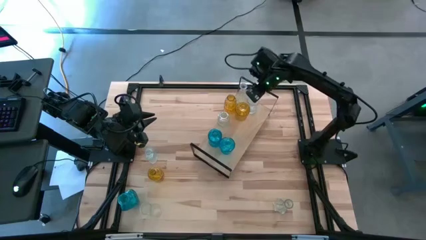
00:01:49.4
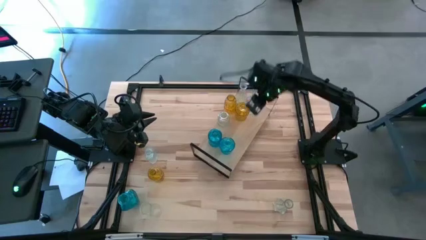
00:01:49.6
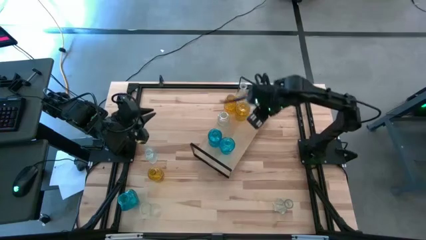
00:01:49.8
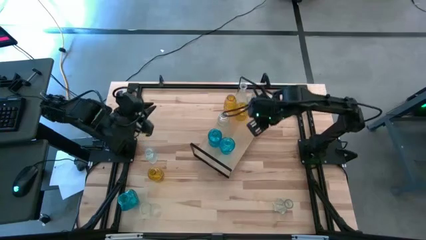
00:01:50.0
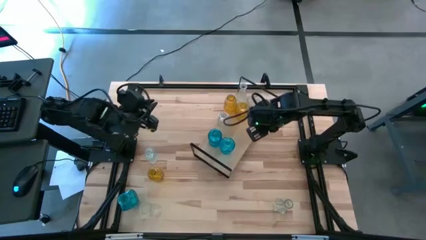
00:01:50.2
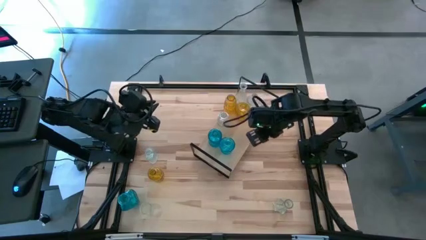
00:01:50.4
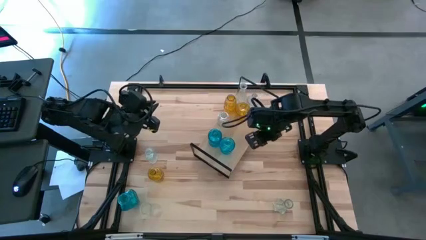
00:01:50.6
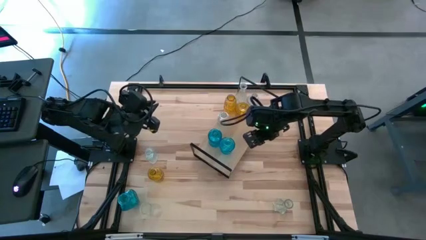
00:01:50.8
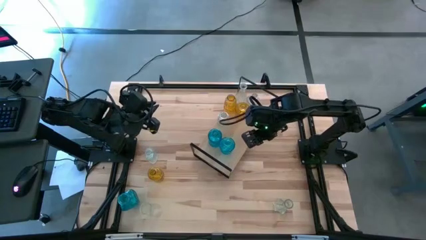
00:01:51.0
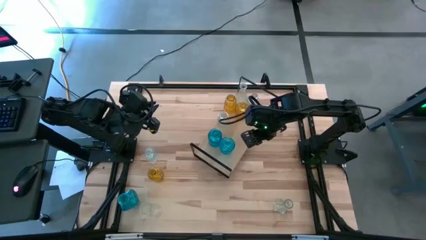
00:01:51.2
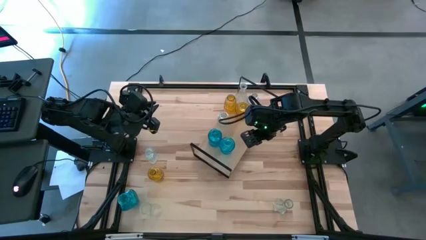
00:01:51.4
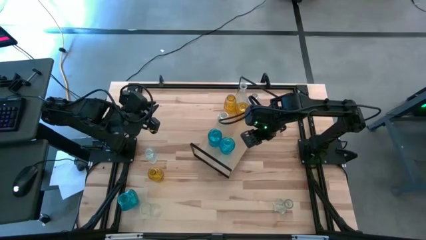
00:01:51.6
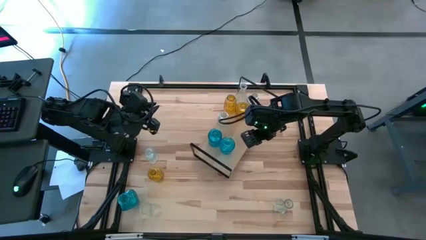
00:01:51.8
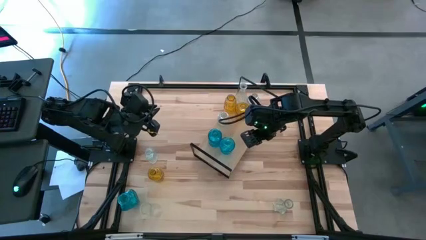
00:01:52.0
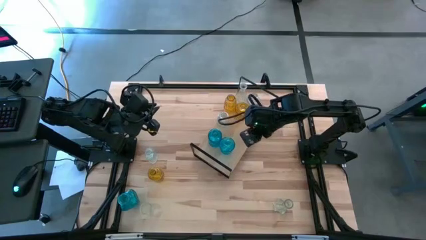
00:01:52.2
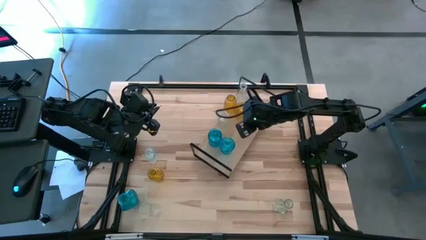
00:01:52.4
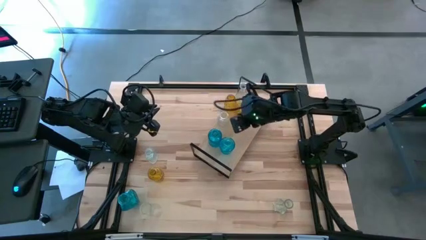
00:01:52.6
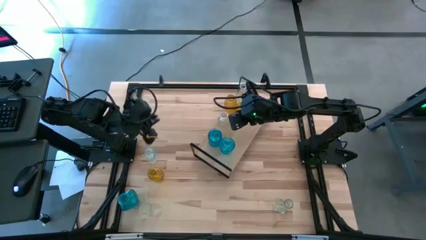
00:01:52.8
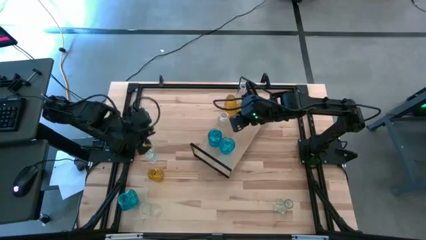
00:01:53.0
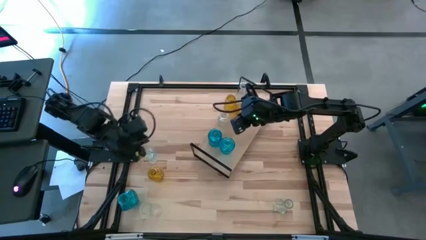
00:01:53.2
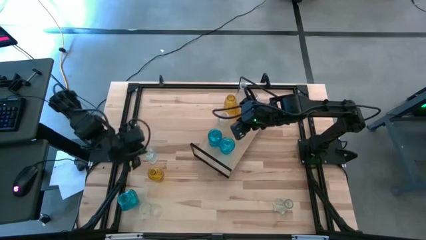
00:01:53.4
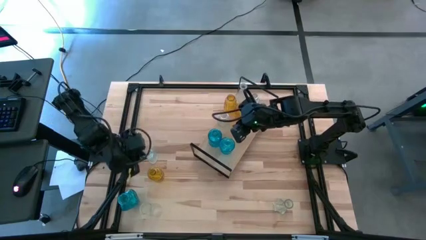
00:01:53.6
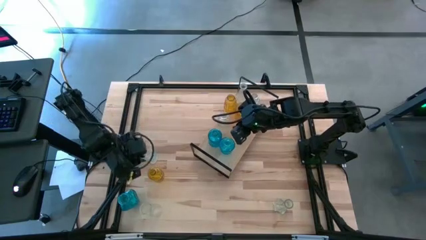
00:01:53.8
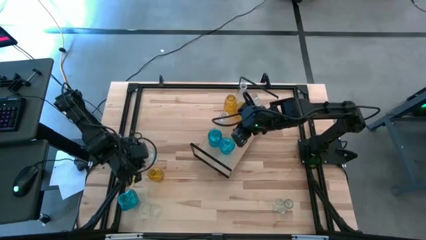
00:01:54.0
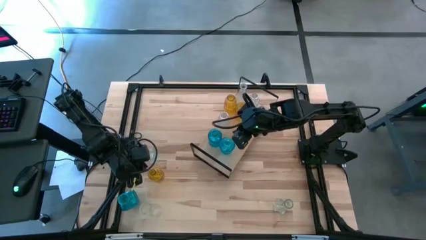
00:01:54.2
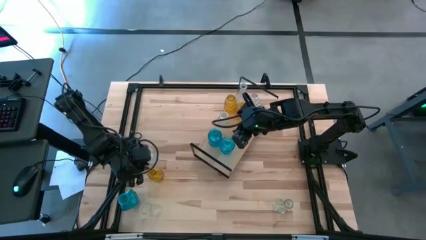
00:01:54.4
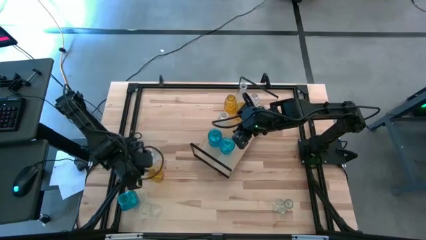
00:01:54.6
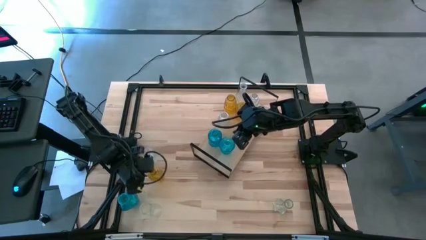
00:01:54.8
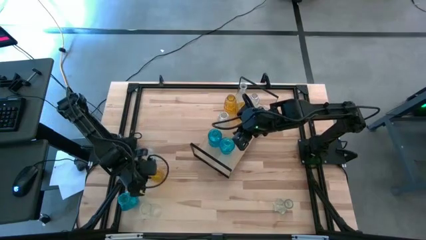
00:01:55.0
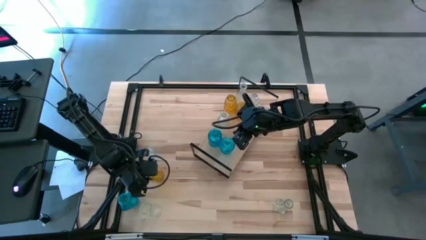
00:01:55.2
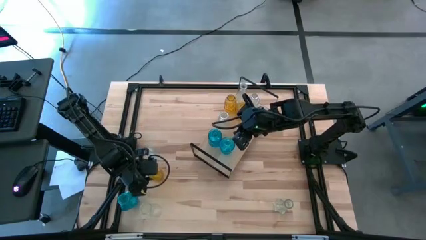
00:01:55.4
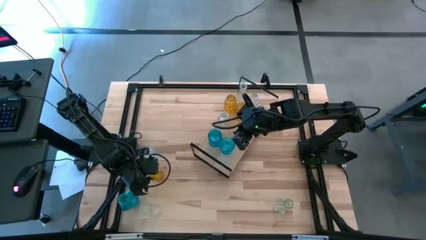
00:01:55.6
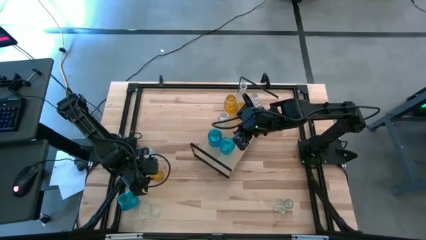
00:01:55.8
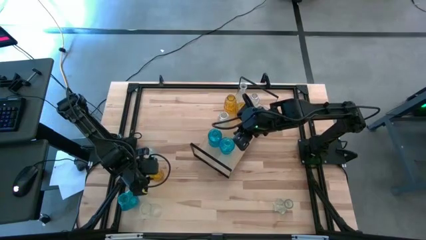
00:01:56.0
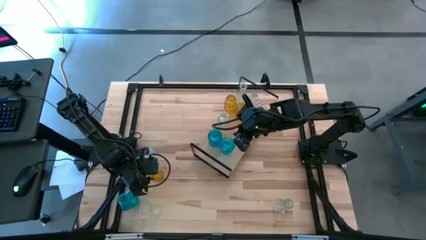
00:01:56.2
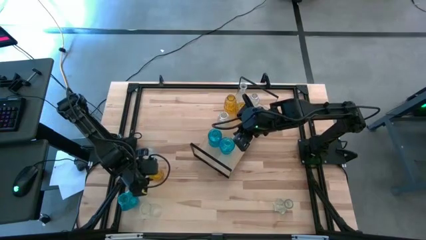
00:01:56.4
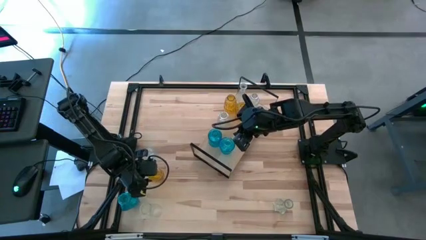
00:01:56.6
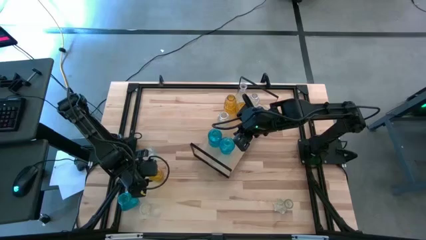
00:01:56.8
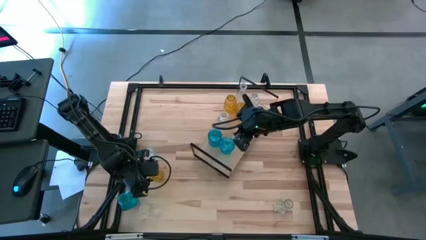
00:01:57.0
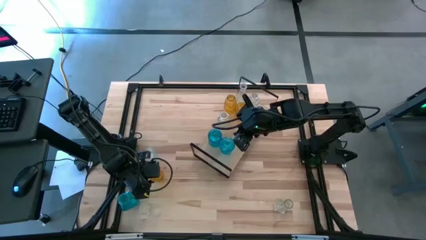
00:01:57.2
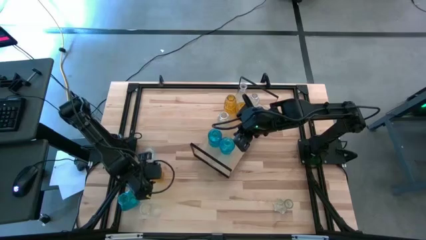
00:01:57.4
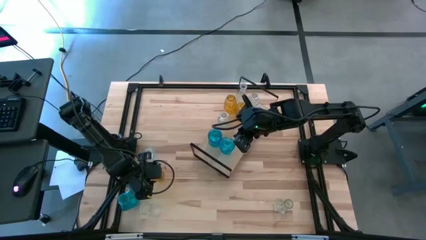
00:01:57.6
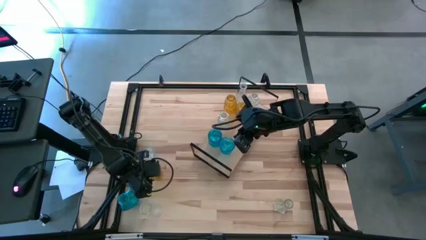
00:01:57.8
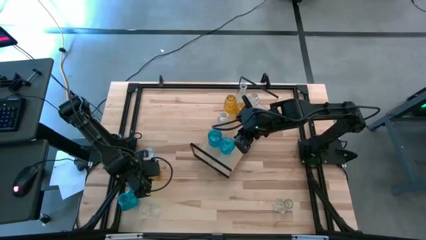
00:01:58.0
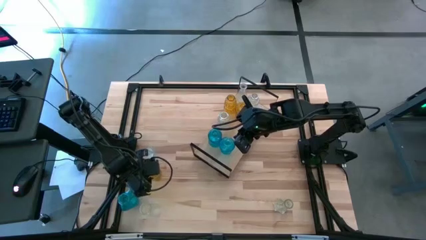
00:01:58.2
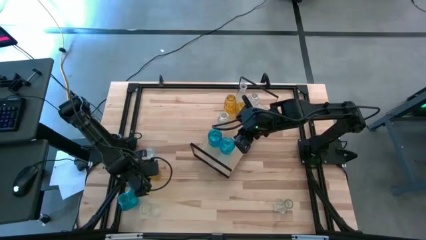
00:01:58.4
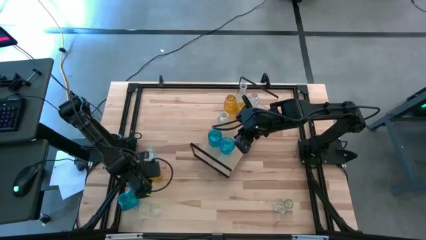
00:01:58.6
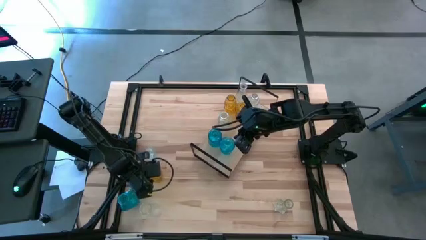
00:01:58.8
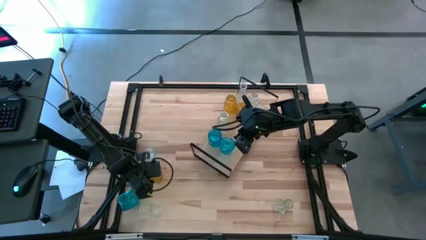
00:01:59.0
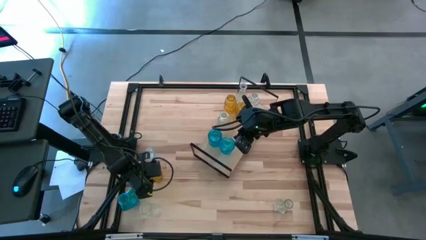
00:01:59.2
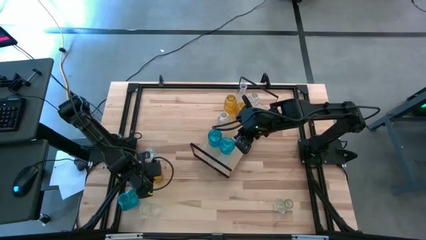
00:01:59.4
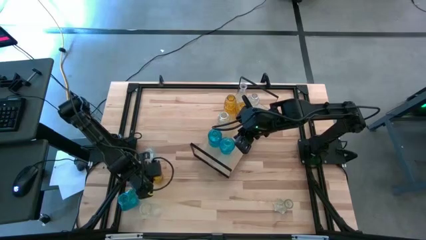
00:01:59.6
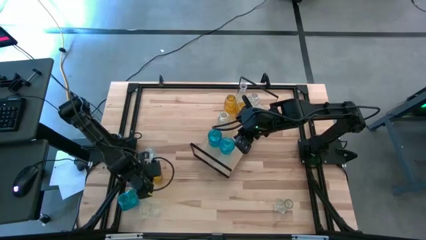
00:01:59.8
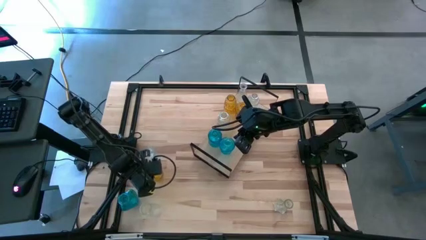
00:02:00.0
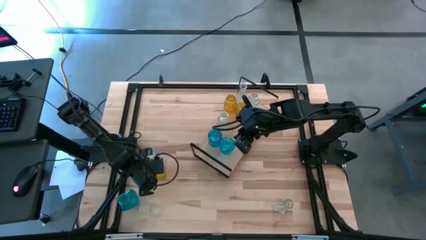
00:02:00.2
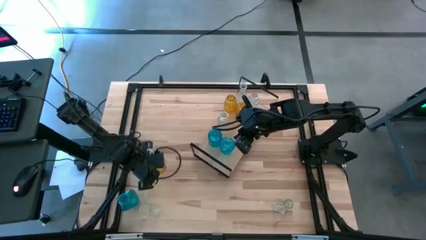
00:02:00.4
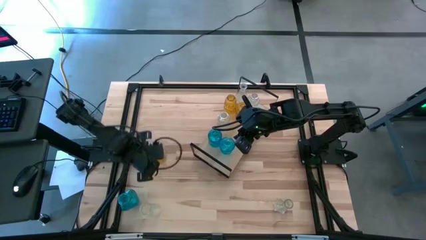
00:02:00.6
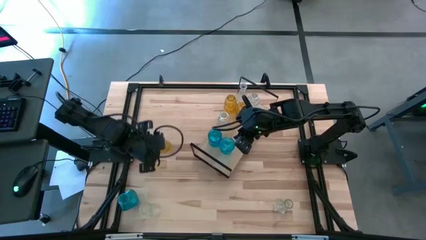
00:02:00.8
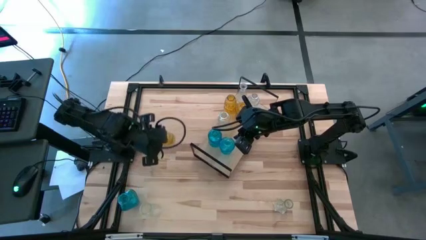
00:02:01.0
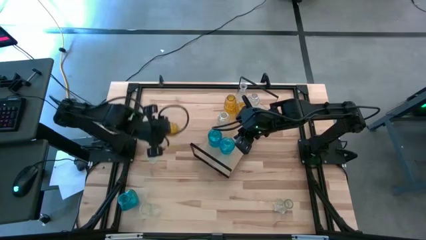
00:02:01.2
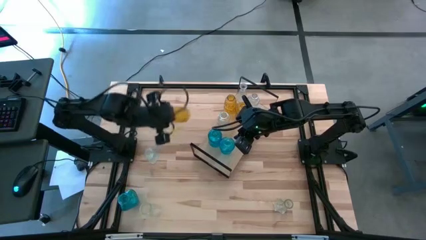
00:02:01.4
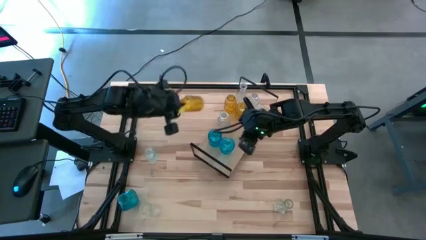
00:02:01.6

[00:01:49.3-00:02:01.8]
Task: sort vases onto shelf
Put the yellow vase on the shelf and align with the other yellow vase
